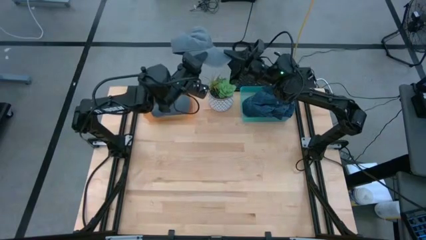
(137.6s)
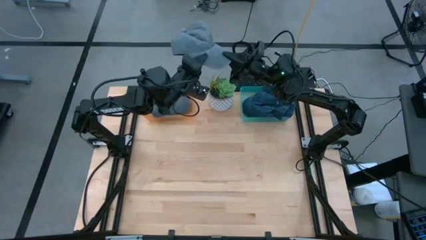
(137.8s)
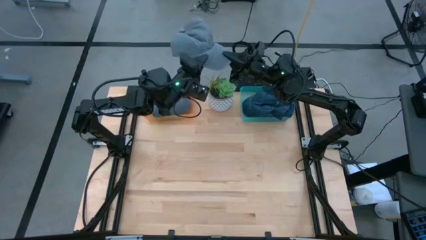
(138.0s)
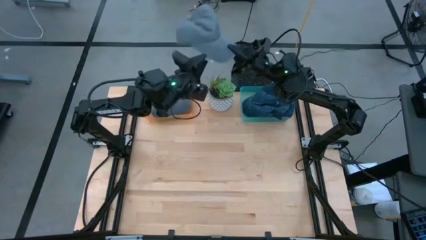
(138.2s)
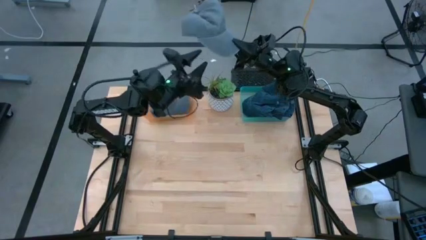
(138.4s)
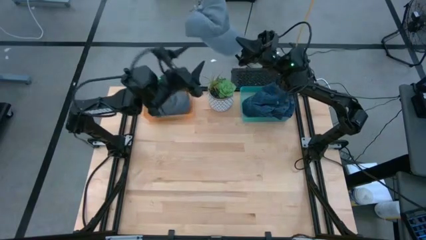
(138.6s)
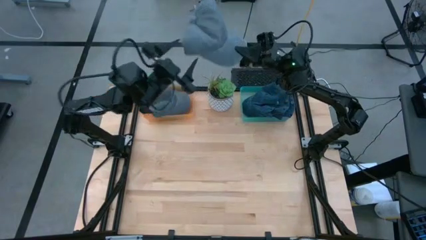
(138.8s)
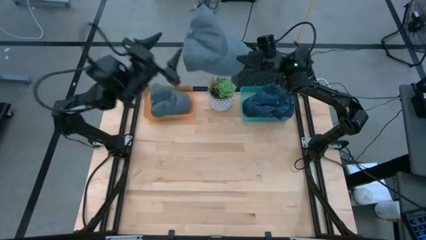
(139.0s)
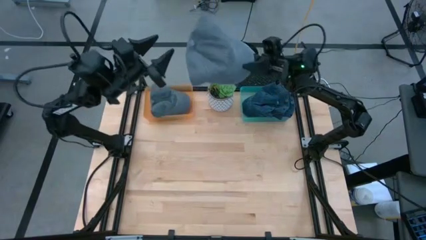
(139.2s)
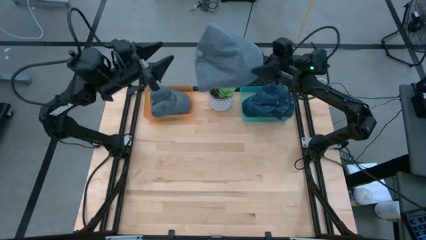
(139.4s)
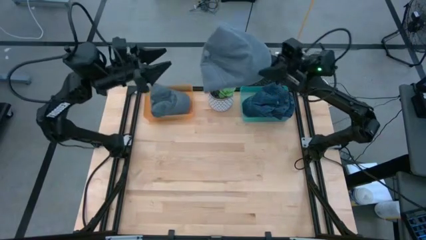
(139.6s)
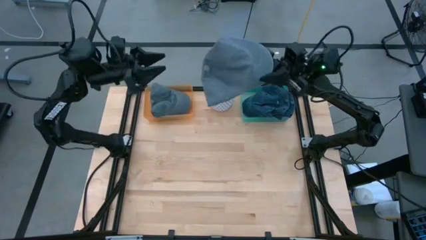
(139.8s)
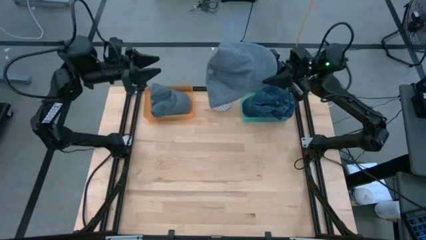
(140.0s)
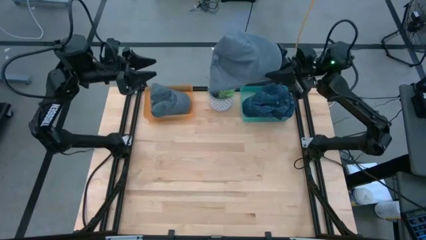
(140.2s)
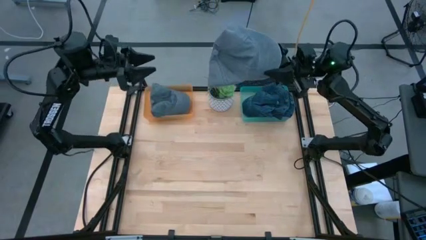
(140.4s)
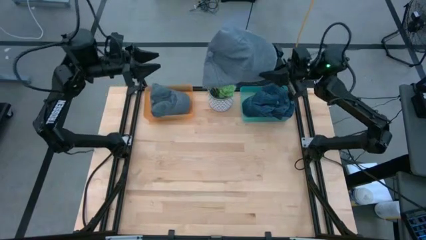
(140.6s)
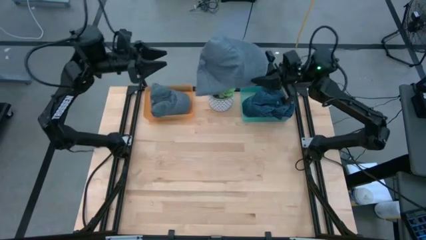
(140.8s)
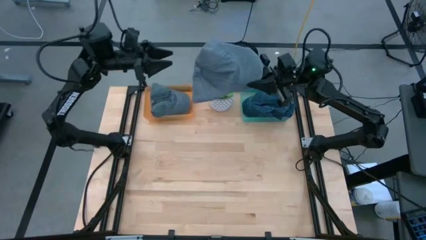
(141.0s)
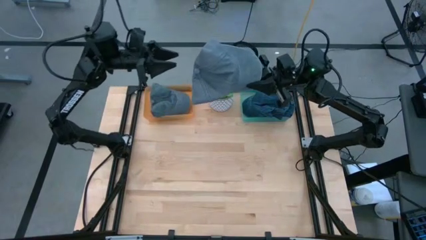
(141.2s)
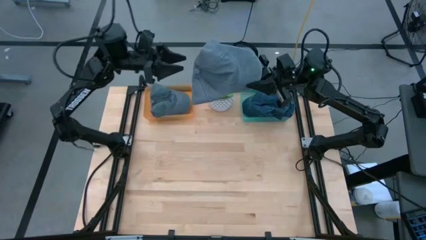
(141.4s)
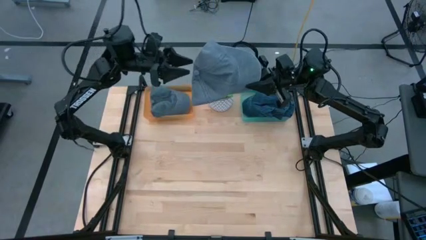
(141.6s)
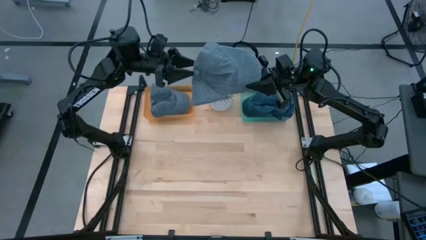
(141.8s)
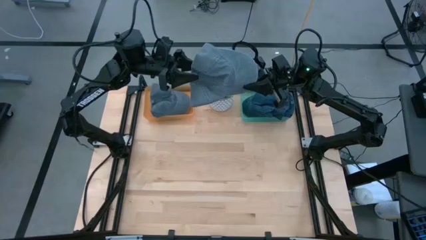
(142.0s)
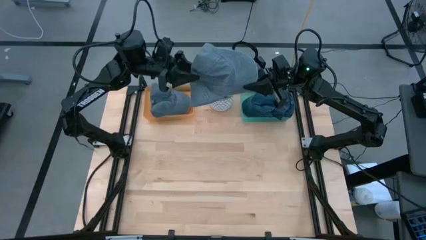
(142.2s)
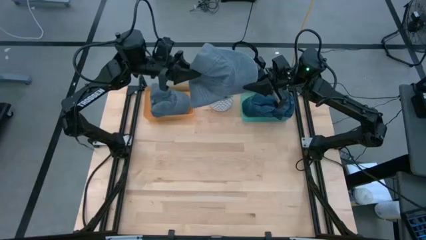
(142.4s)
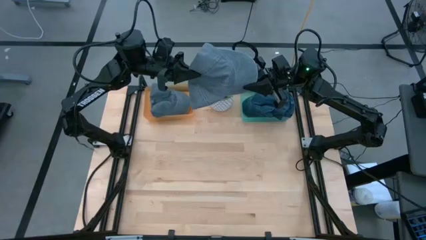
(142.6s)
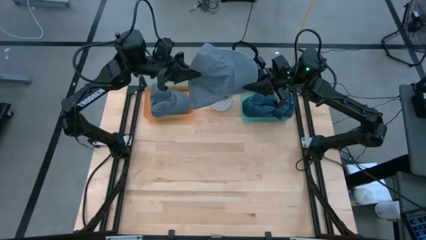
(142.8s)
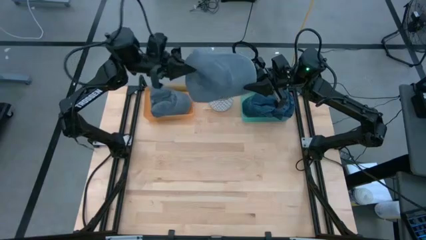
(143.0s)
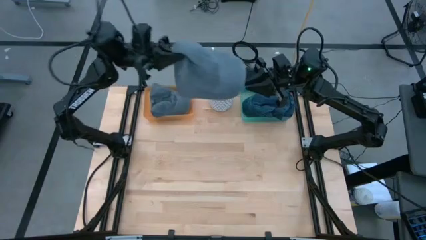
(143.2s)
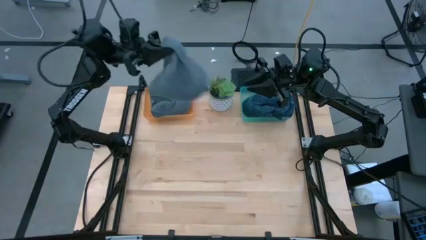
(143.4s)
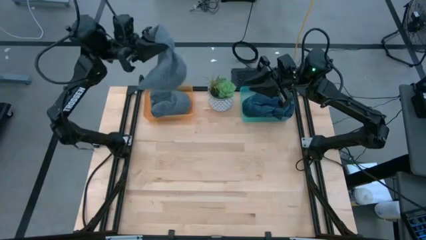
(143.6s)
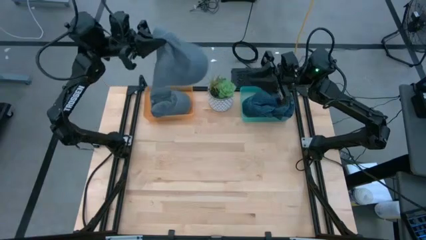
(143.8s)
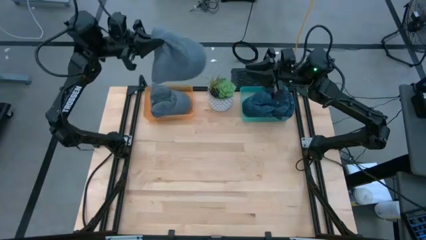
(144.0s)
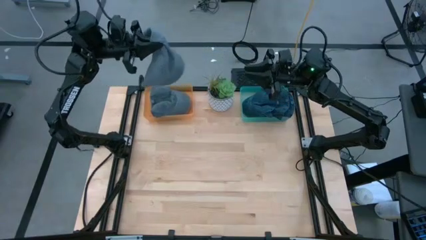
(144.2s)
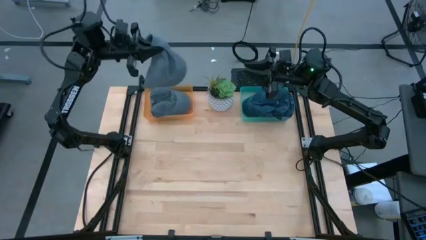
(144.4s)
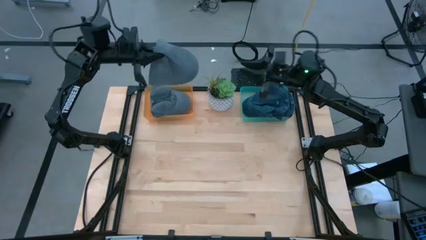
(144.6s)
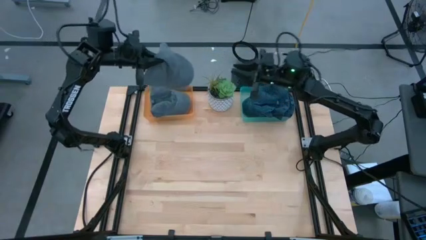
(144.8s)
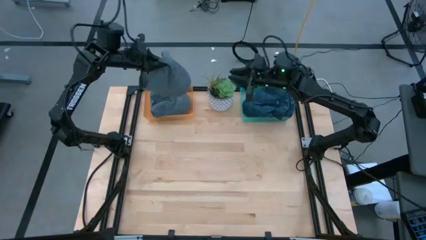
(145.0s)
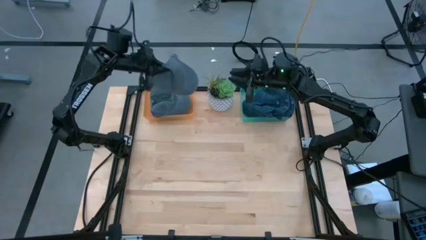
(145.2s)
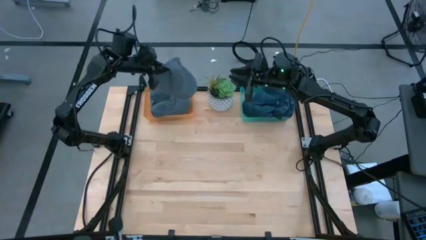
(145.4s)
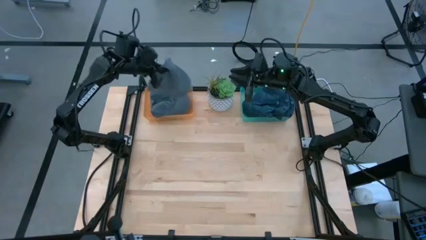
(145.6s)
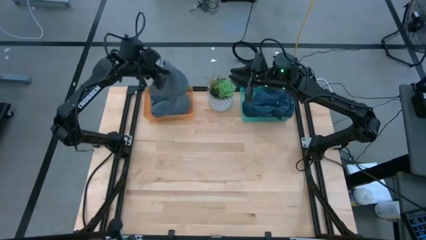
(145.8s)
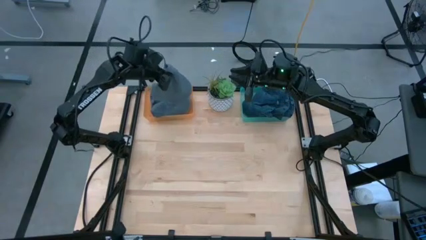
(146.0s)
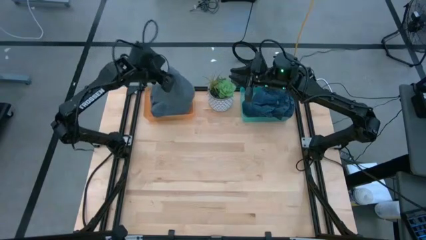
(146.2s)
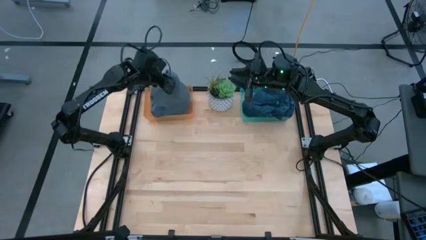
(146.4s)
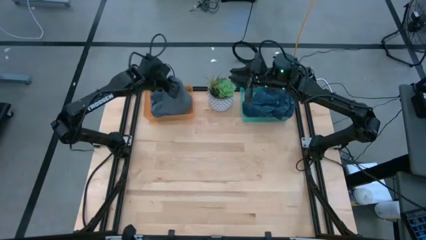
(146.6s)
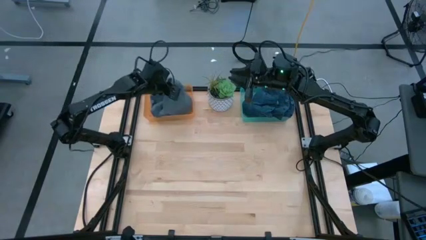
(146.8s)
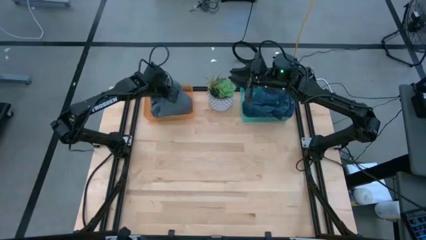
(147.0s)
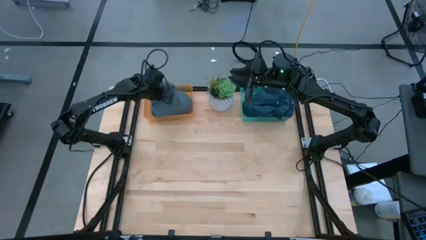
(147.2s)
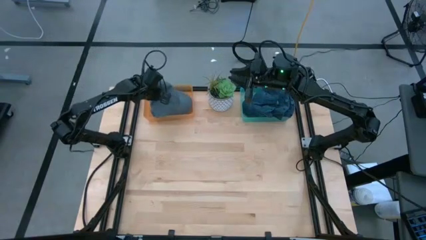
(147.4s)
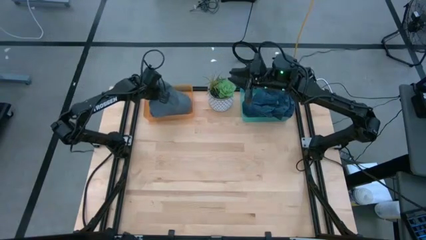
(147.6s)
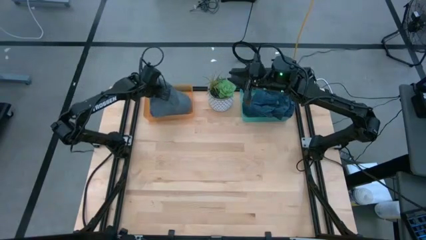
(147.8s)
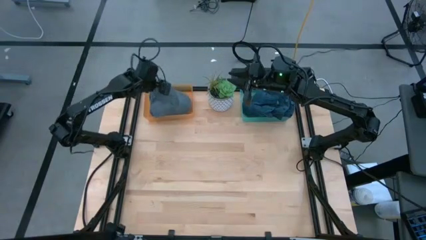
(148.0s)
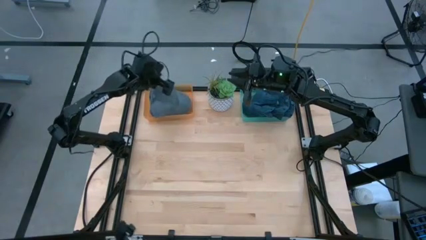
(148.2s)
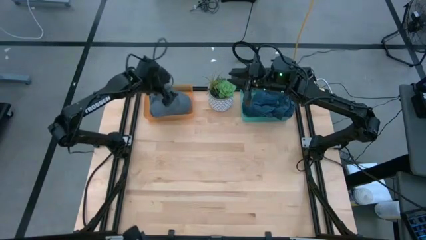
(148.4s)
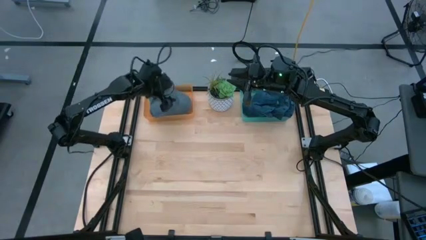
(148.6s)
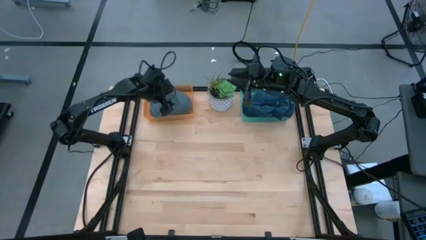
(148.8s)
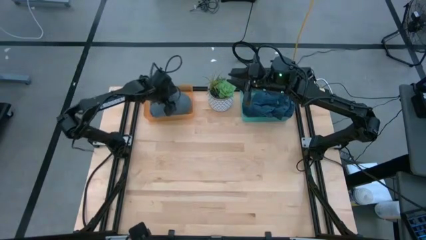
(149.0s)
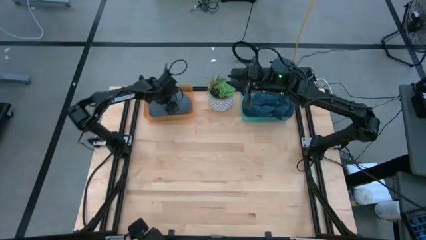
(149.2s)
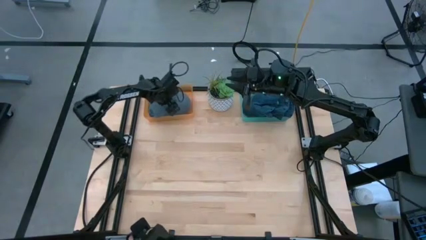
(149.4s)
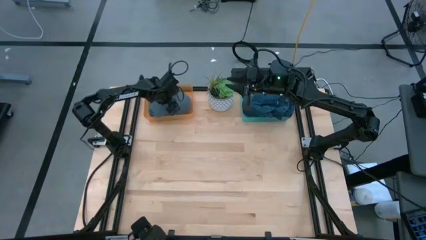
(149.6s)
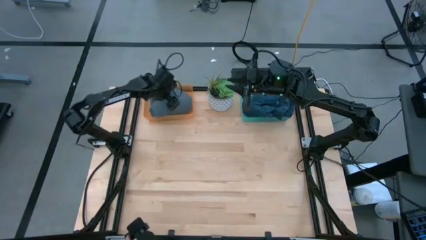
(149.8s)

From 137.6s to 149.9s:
Task: Pick & Place hat
Put the gray cap into the orange bin

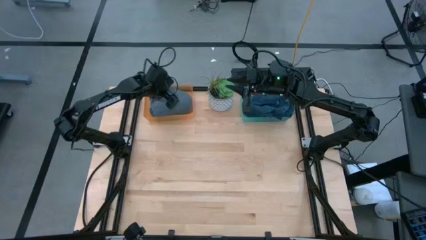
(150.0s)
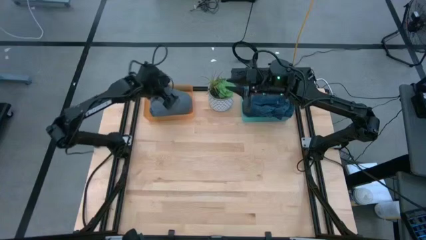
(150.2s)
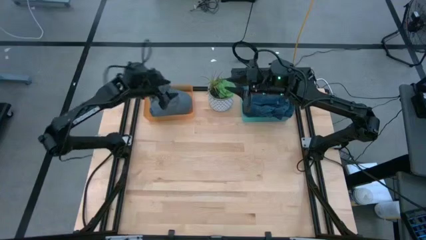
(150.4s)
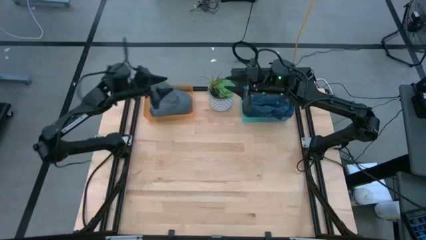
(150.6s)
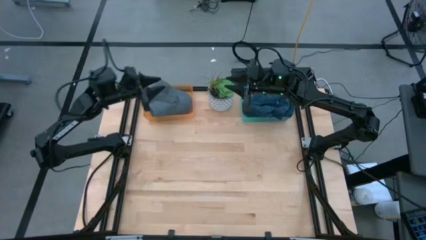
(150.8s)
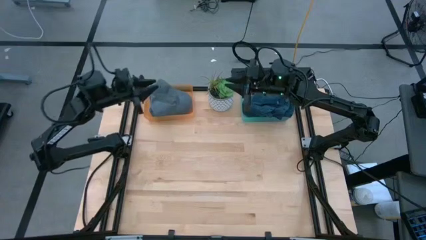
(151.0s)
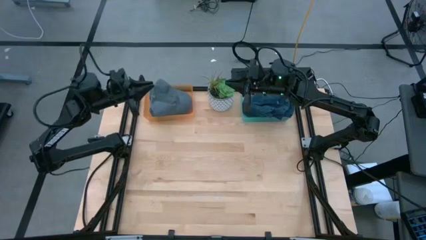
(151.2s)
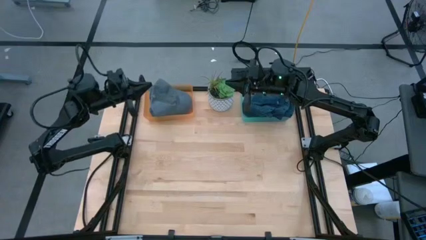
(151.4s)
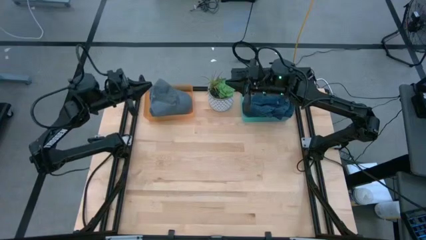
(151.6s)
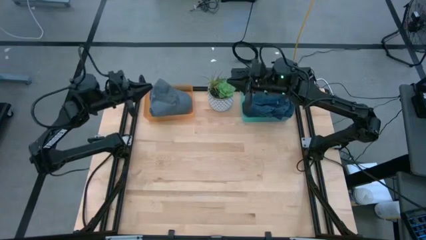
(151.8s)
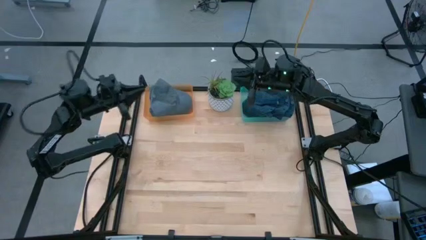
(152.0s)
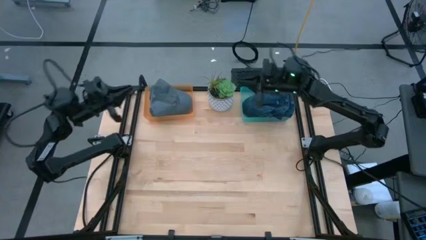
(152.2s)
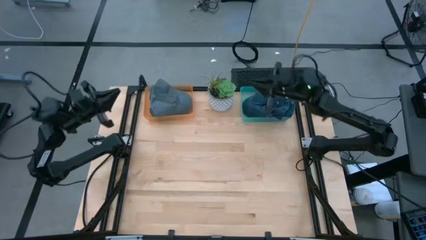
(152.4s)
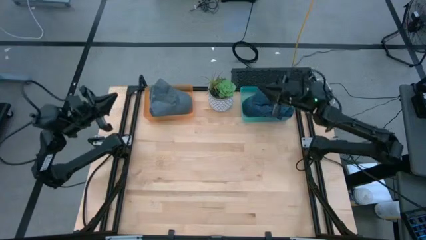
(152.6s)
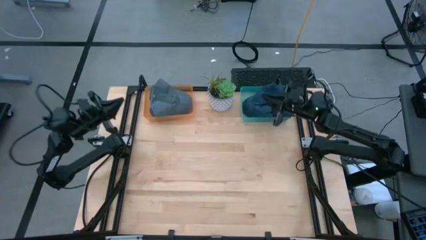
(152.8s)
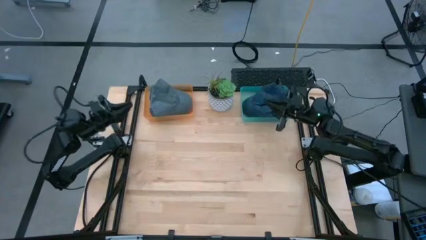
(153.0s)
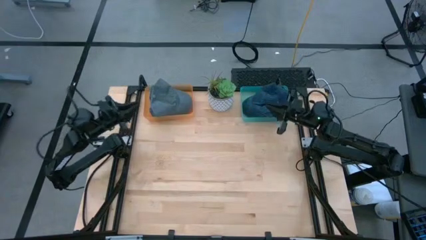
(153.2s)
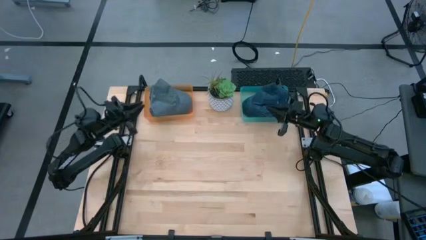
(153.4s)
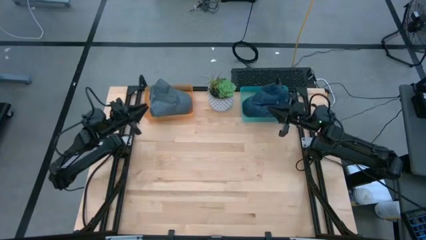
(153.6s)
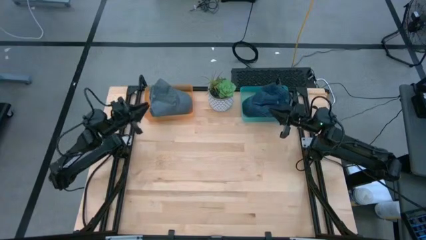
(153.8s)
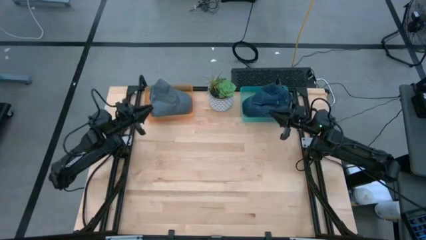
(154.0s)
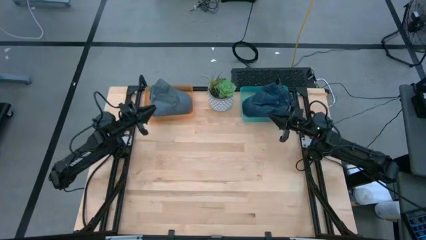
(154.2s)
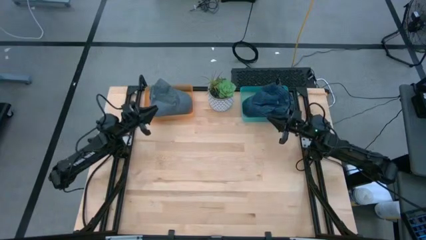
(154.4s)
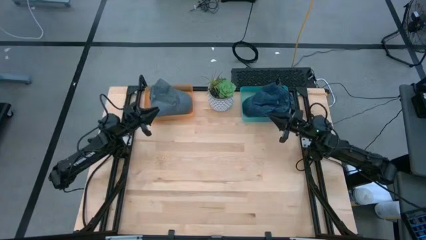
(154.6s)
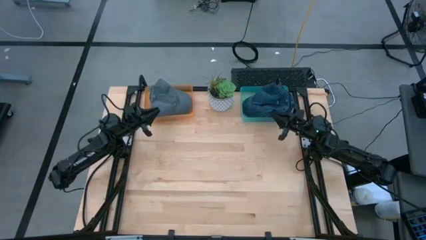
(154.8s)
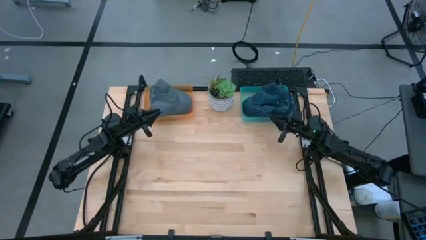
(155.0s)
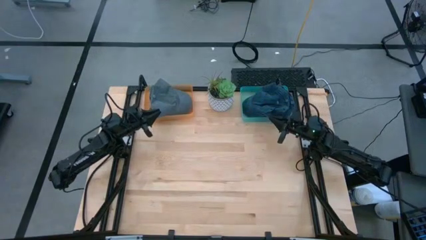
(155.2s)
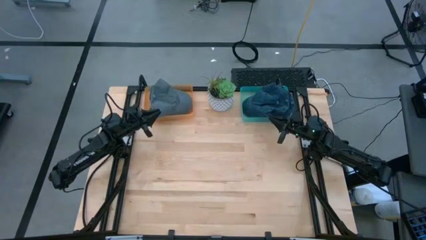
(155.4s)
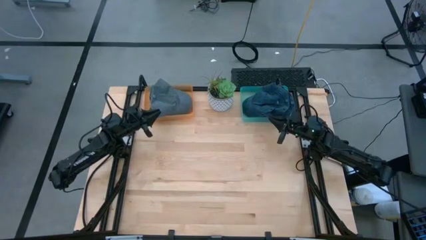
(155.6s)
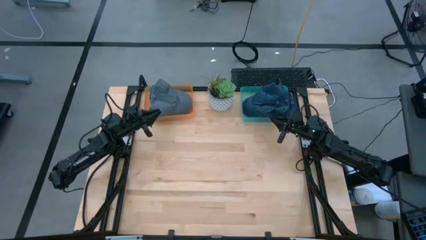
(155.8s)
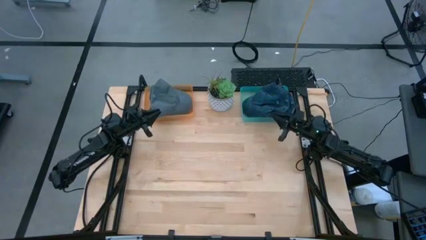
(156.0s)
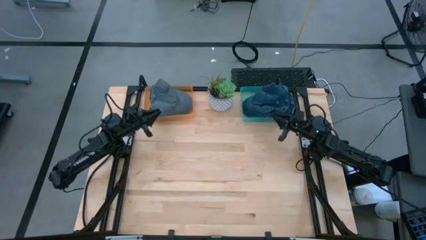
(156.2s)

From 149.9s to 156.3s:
Return to Home Position
